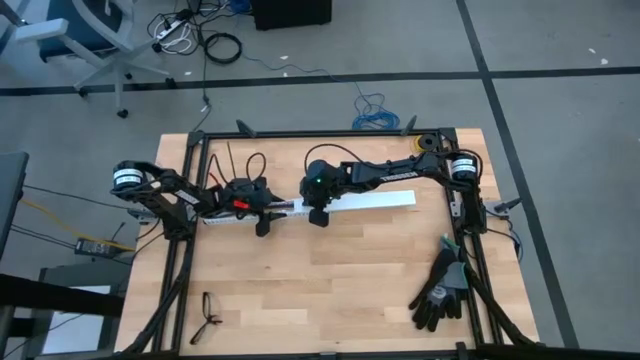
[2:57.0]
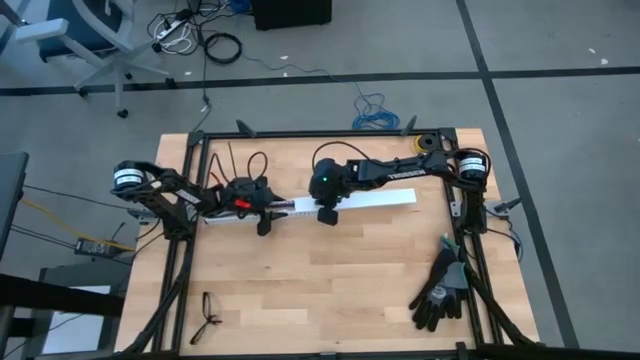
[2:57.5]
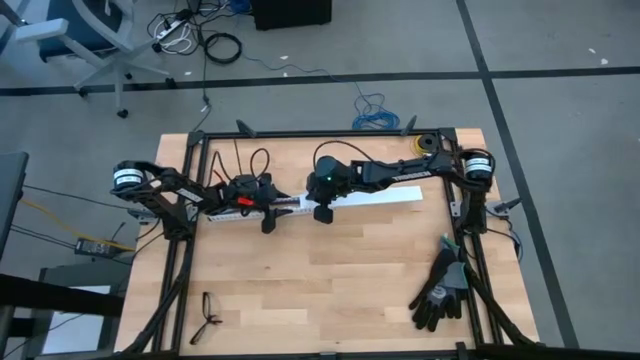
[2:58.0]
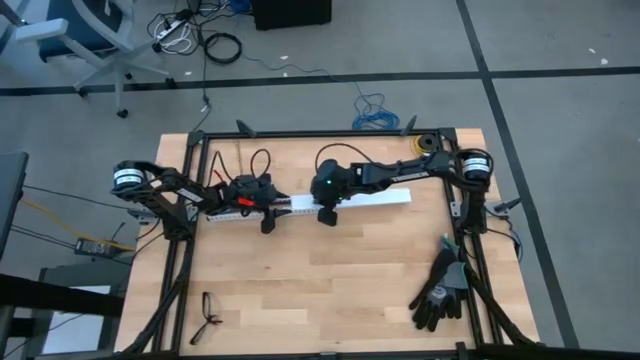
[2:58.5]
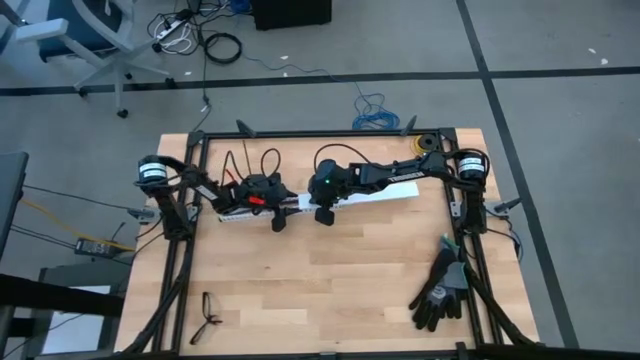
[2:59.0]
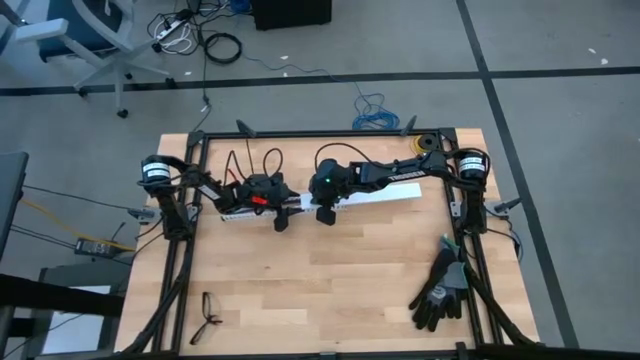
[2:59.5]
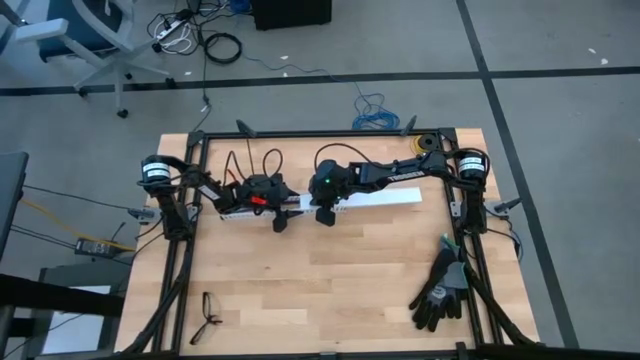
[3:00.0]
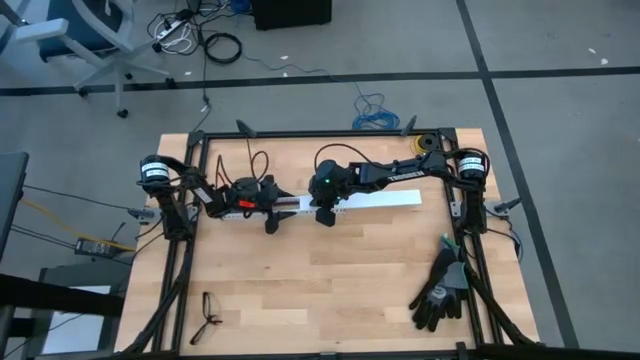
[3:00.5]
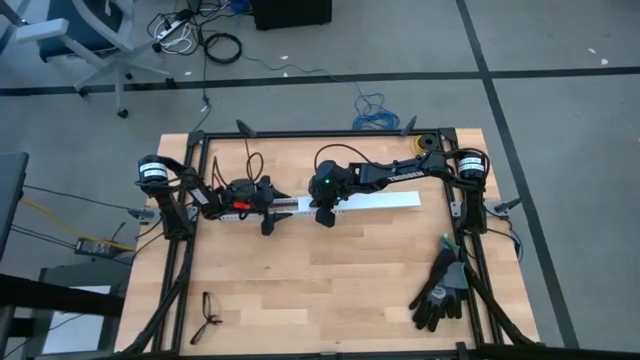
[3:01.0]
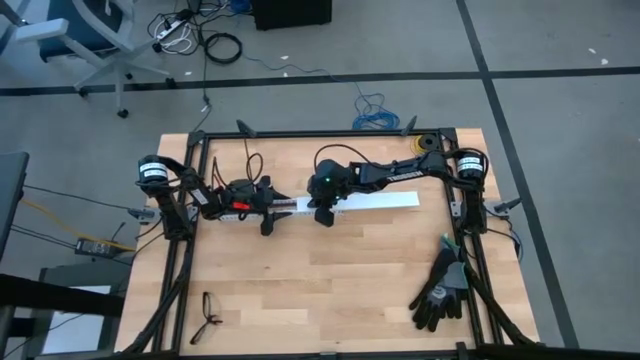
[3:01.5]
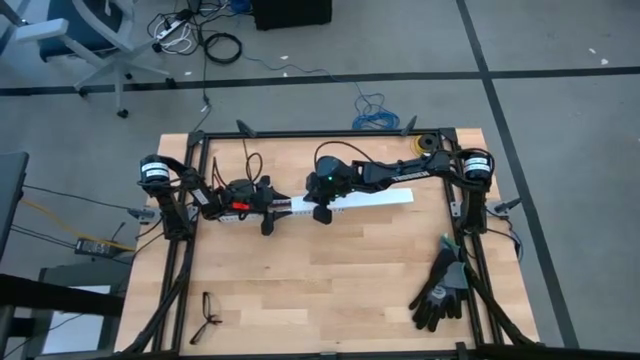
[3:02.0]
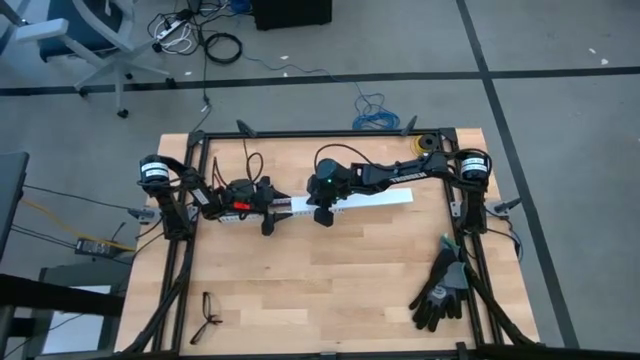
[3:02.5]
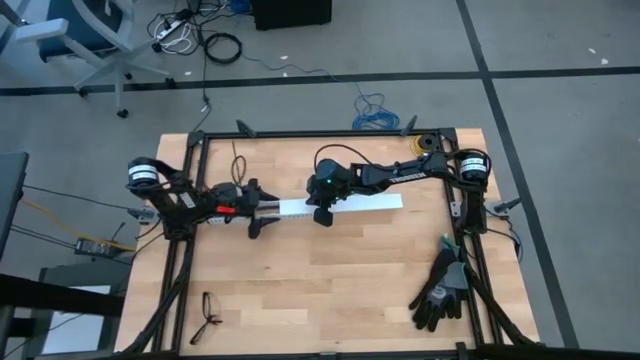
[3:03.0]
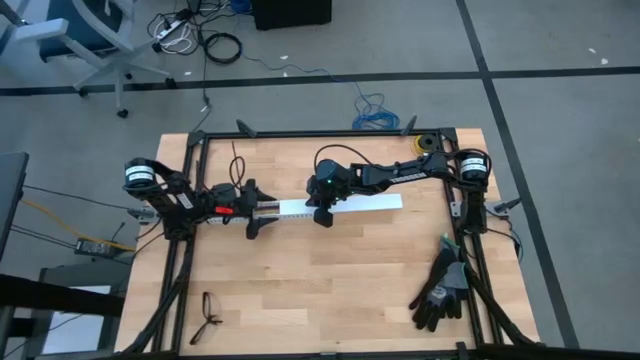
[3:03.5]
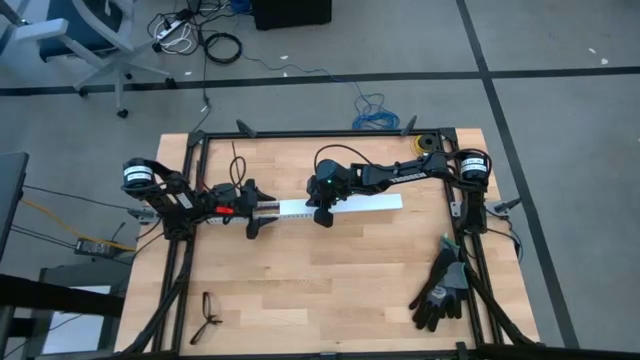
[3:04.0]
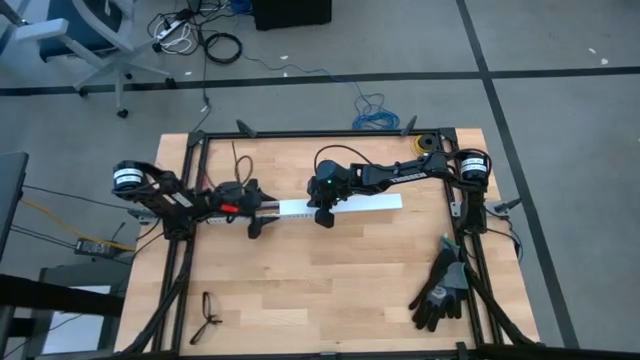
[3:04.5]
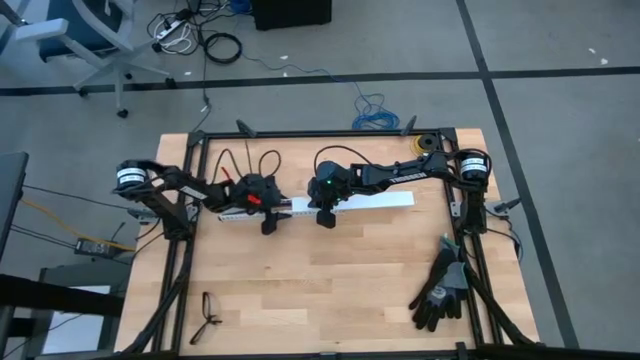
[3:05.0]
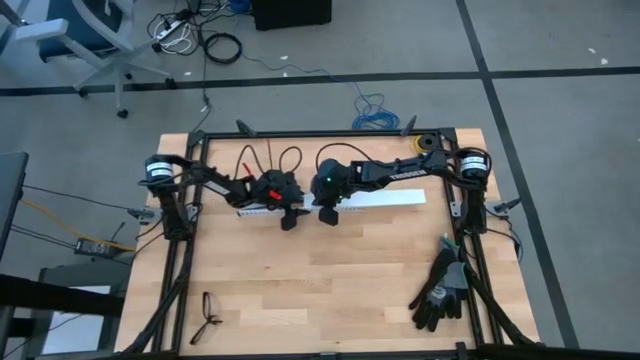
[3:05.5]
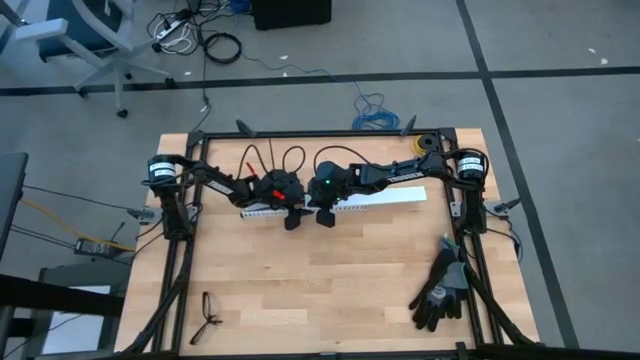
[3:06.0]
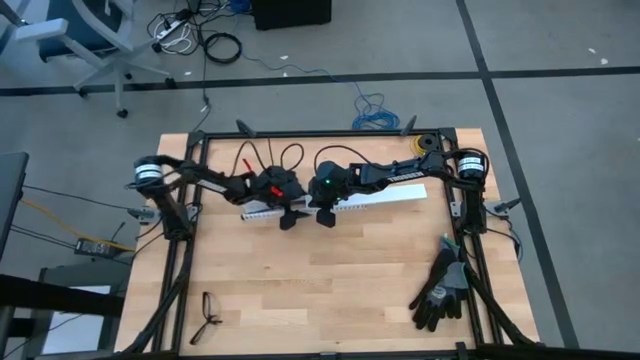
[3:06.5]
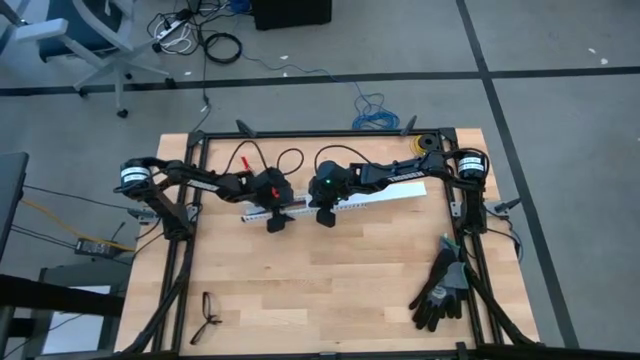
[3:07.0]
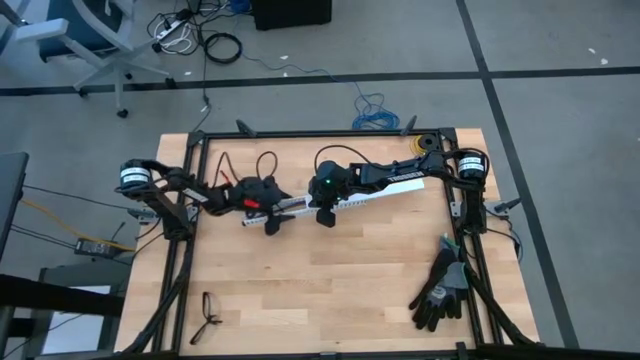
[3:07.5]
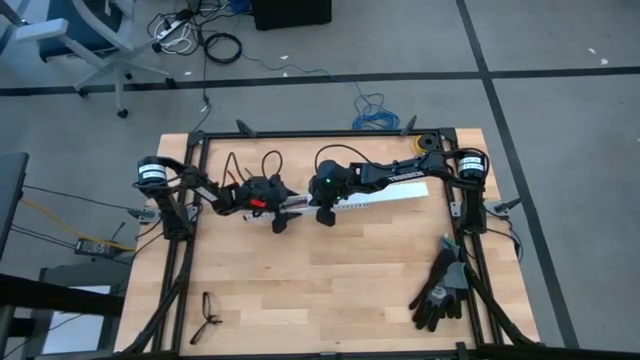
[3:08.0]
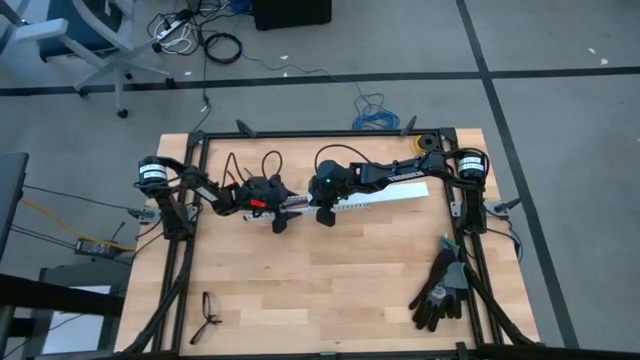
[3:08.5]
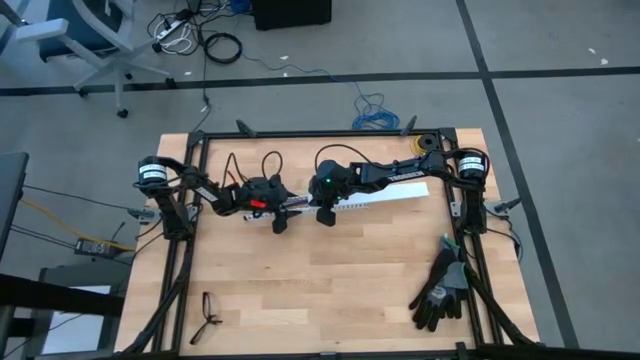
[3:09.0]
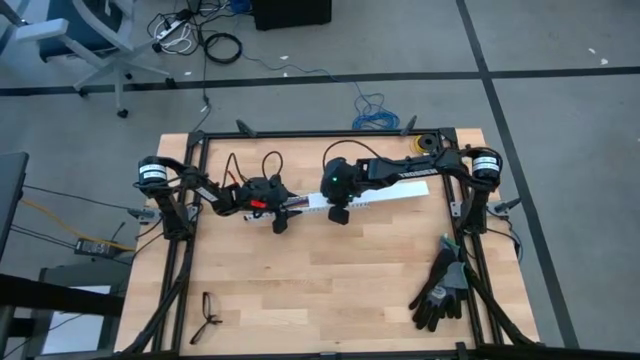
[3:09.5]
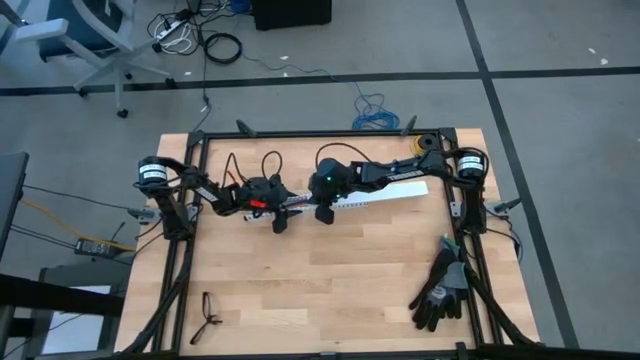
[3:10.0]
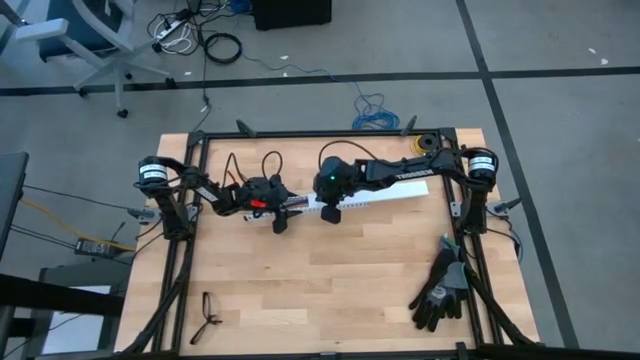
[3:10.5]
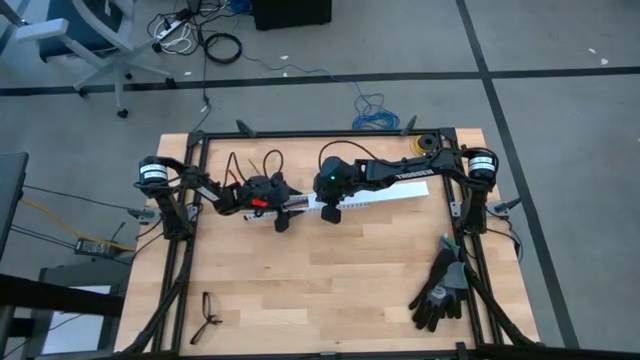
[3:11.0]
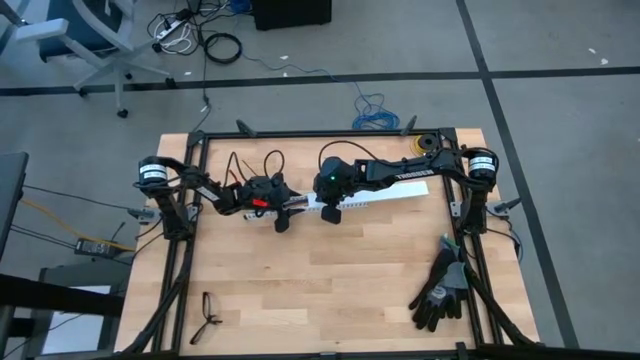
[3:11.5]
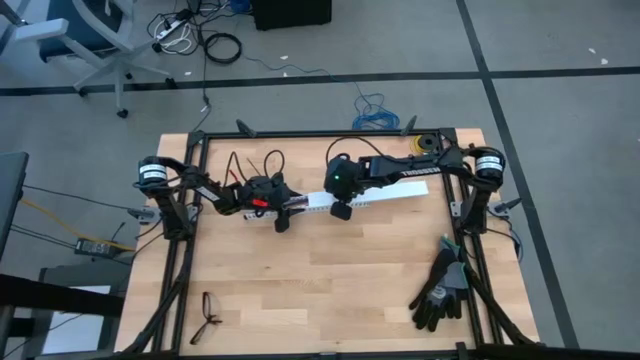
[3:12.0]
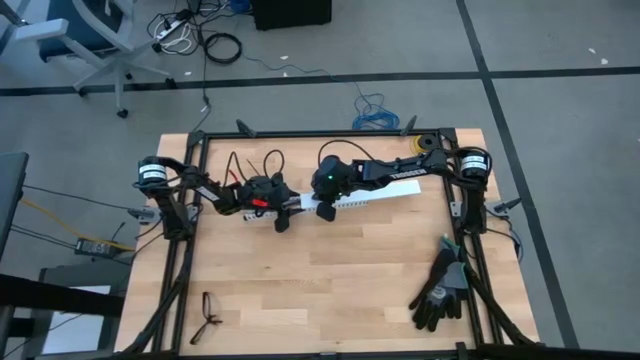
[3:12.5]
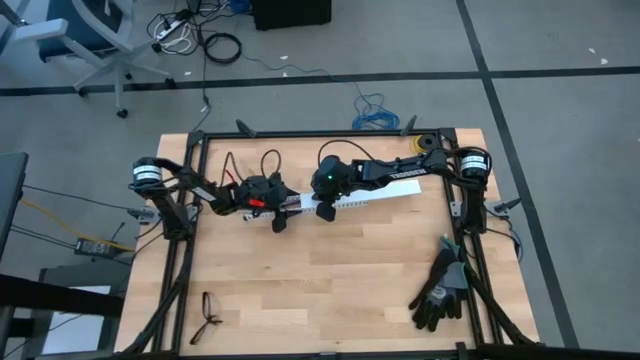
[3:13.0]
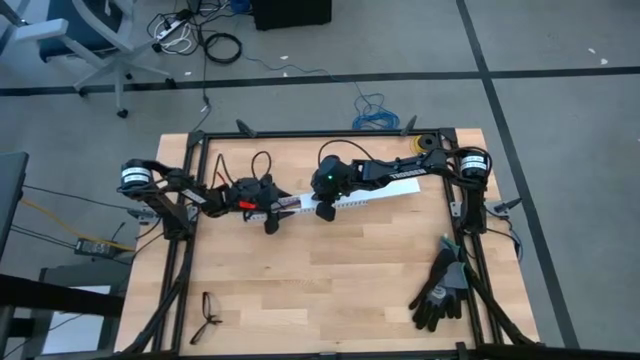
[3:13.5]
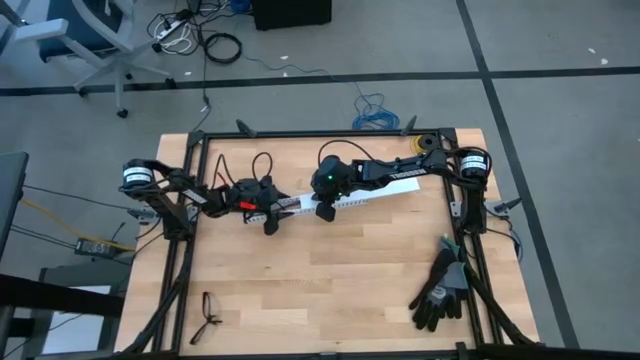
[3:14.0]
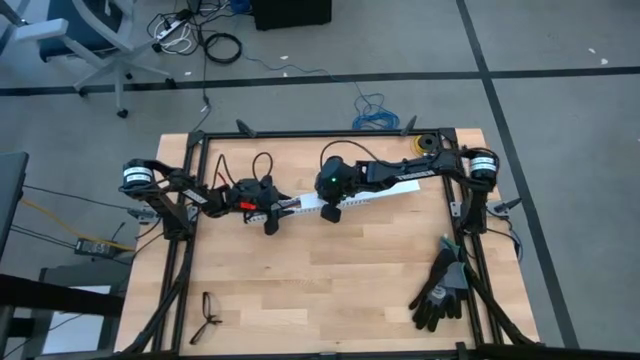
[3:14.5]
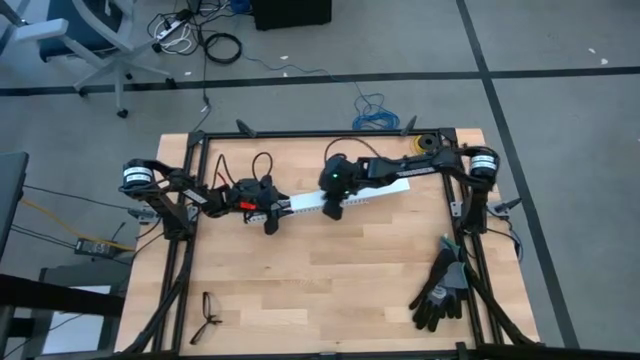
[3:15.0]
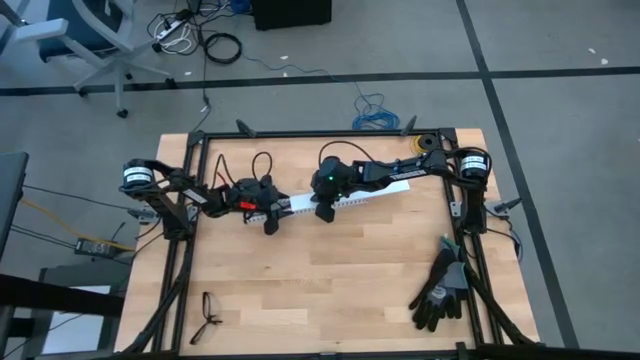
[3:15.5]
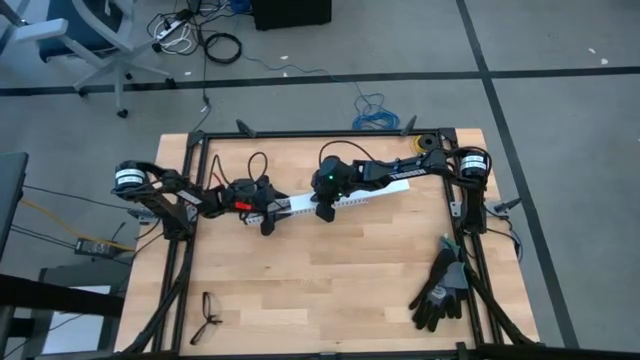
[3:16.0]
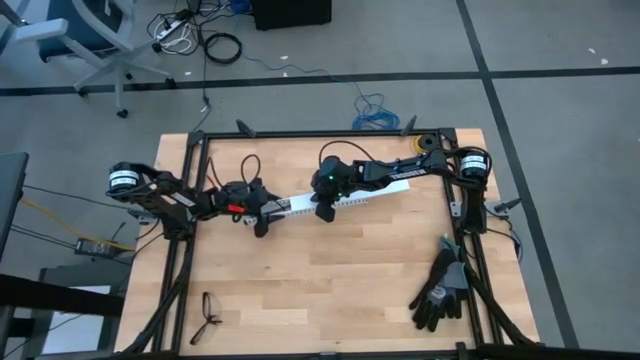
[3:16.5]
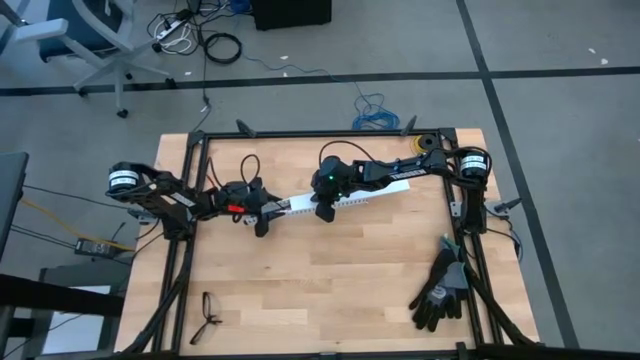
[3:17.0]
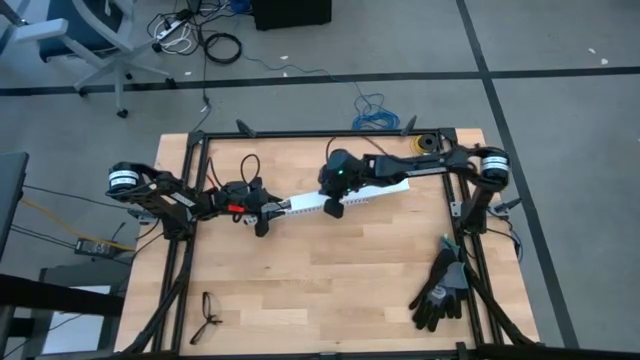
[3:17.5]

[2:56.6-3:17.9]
Task: Ziptie cables
Close the white cable duct with the white cable duct cover
